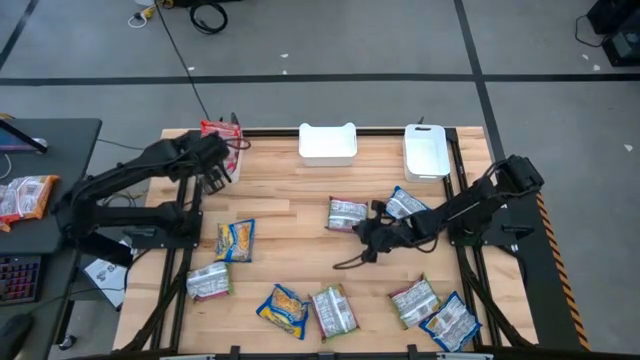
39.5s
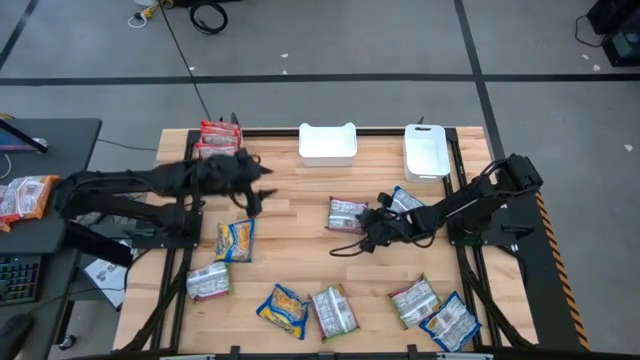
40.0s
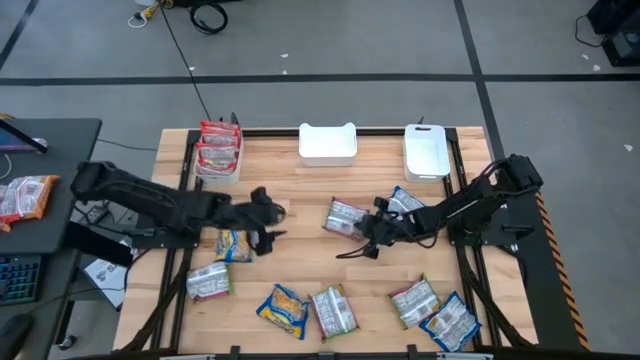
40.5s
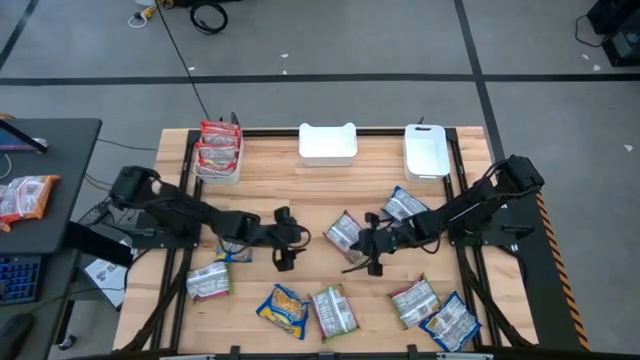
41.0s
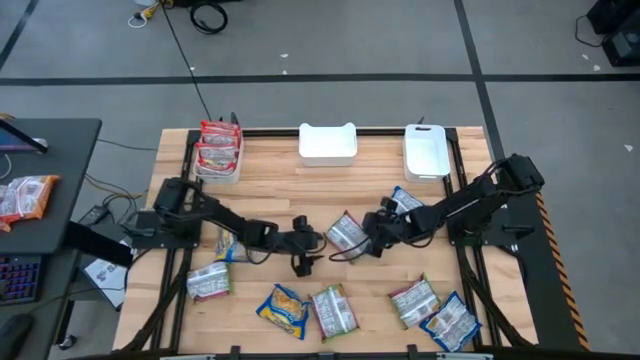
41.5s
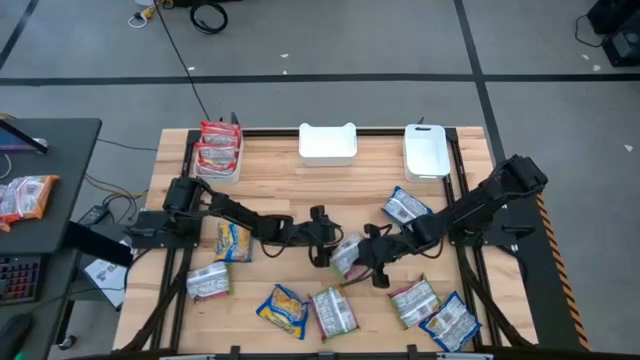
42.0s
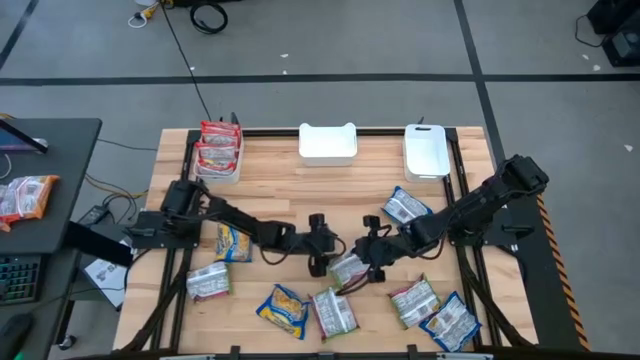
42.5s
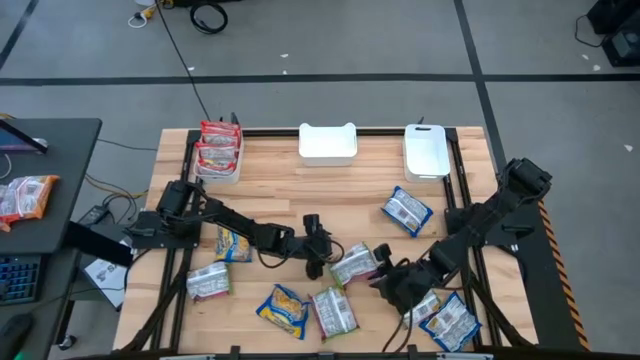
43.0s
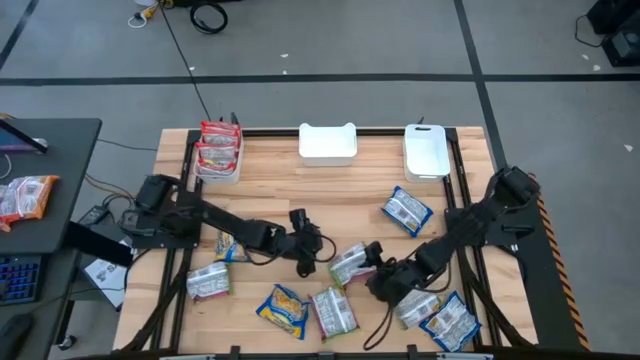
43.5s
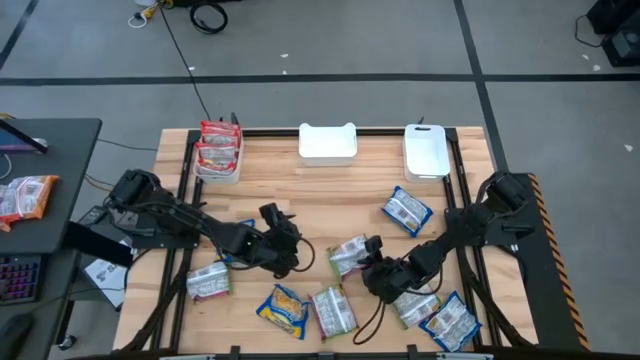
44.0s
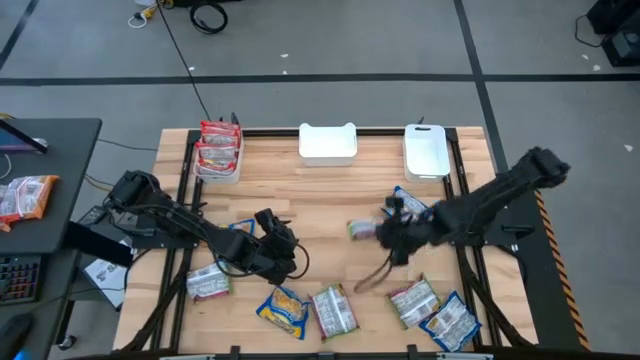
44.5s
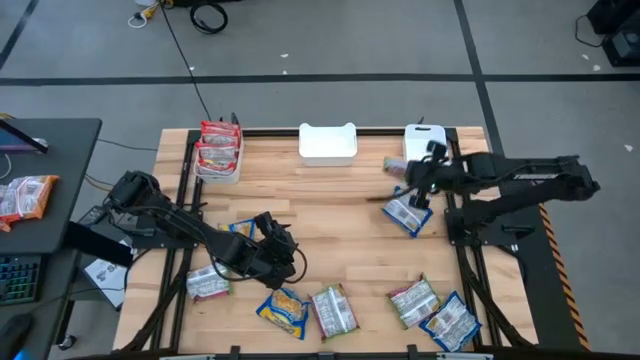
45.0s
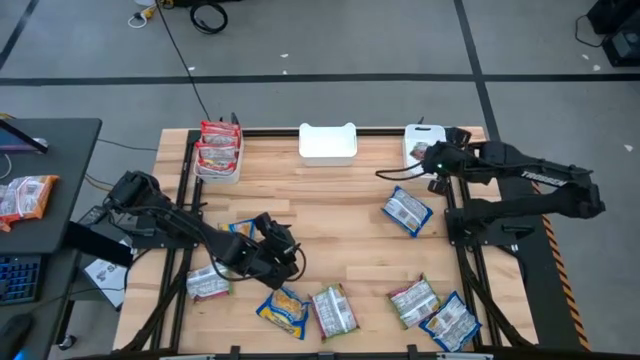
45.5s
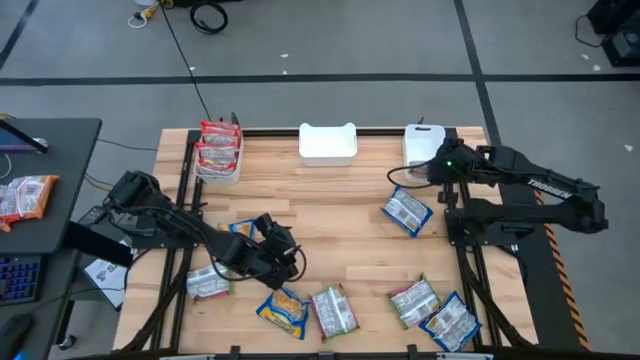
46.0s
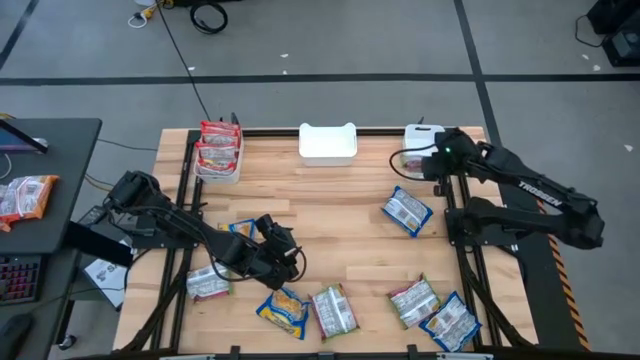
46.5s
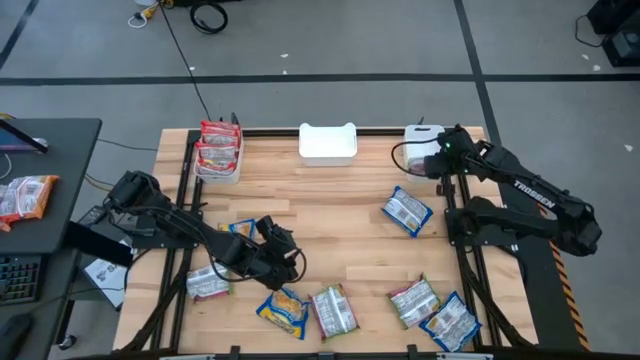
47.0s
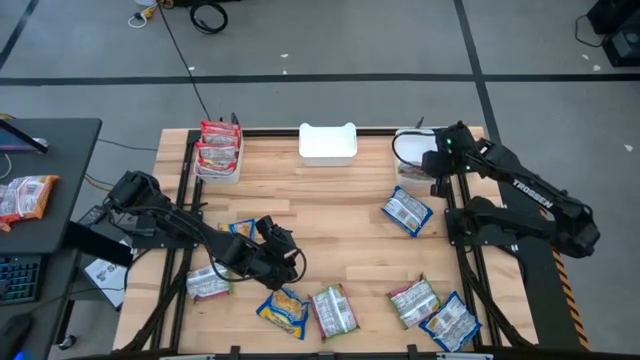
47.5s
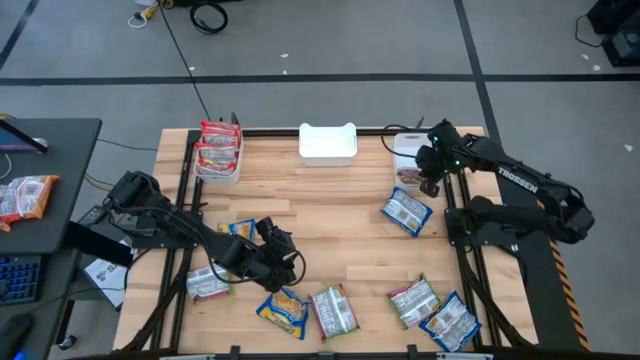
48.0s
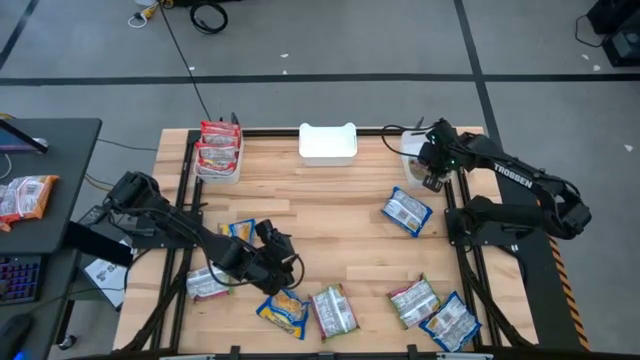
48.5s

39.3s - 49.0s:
Task: Sort Maruchan noodles
Put the green noodle pack into the right white bin

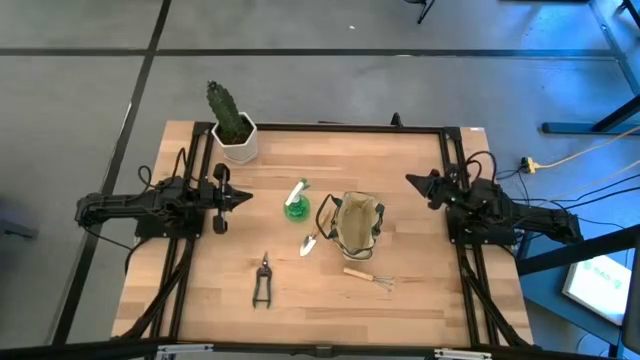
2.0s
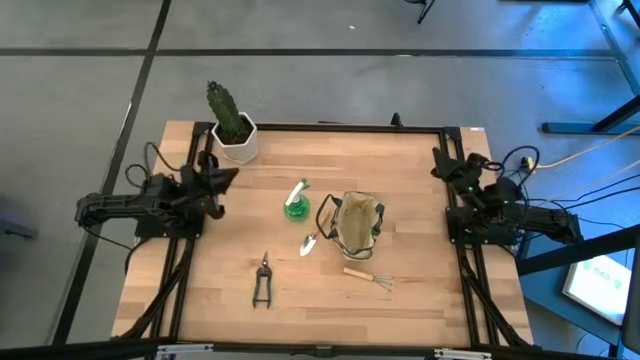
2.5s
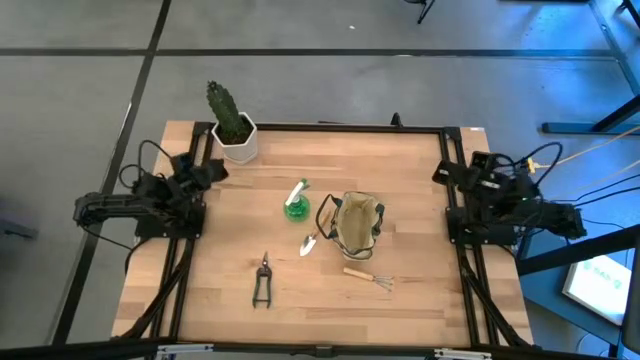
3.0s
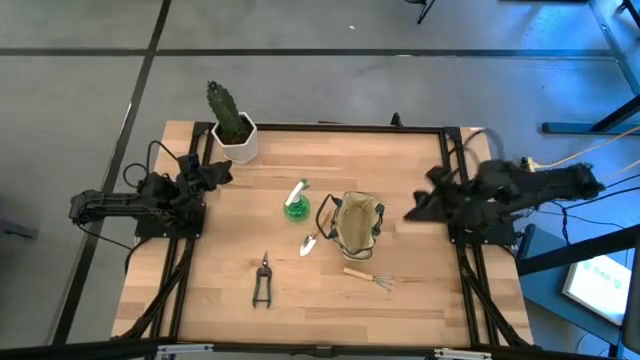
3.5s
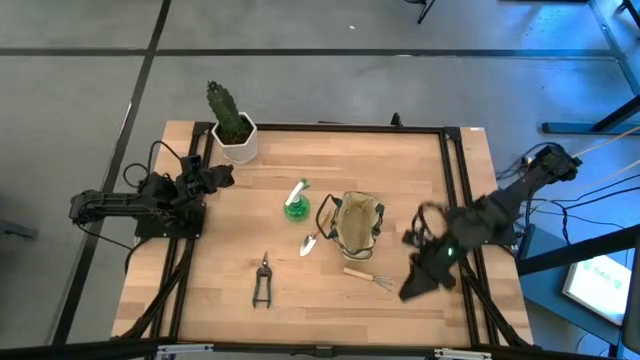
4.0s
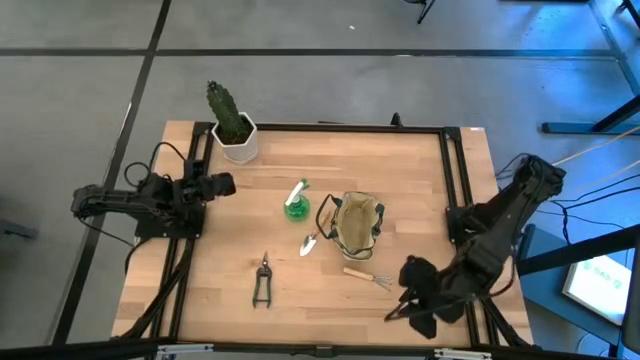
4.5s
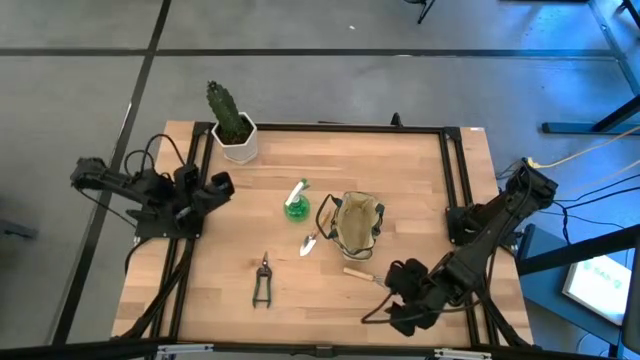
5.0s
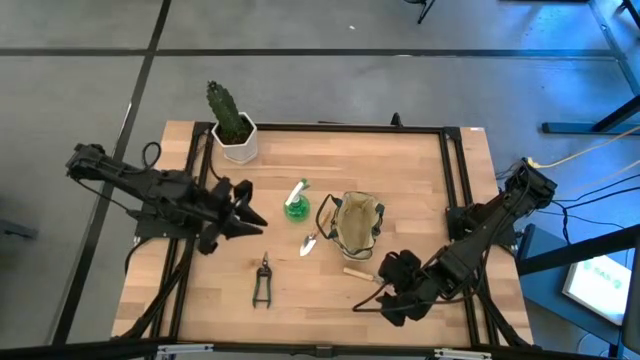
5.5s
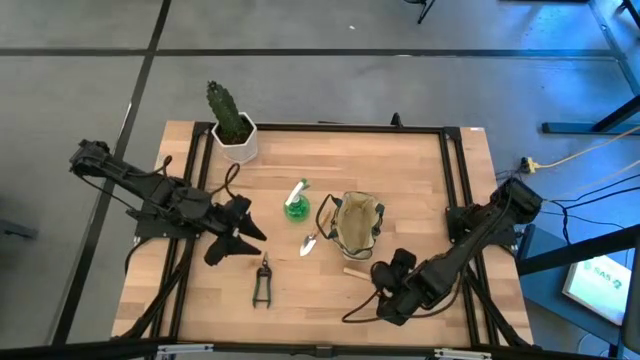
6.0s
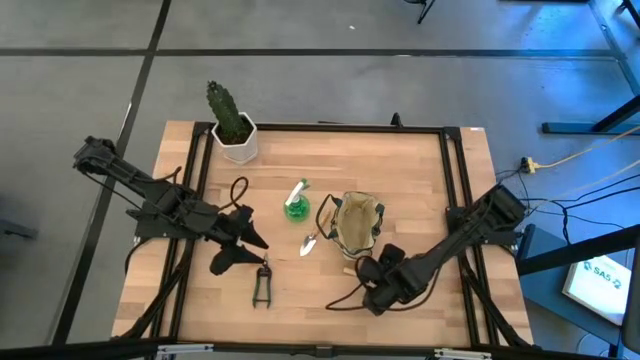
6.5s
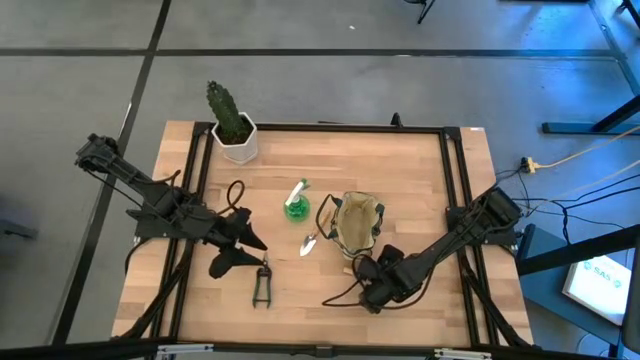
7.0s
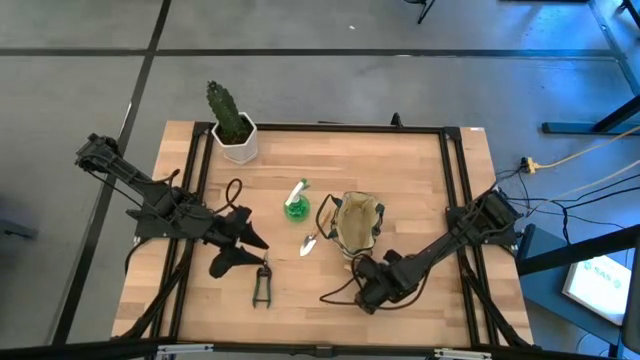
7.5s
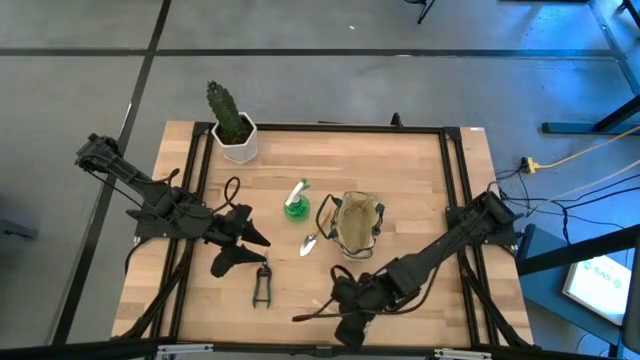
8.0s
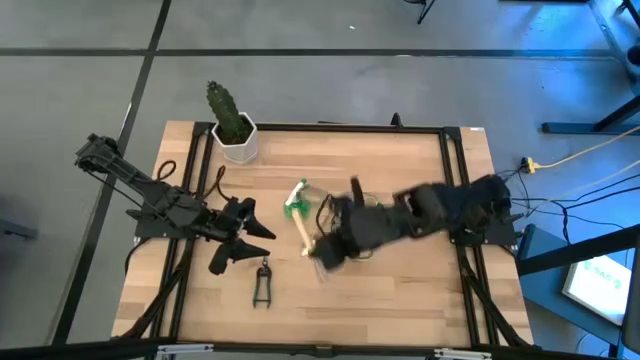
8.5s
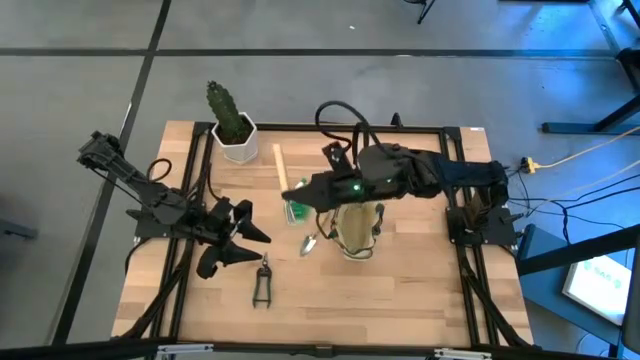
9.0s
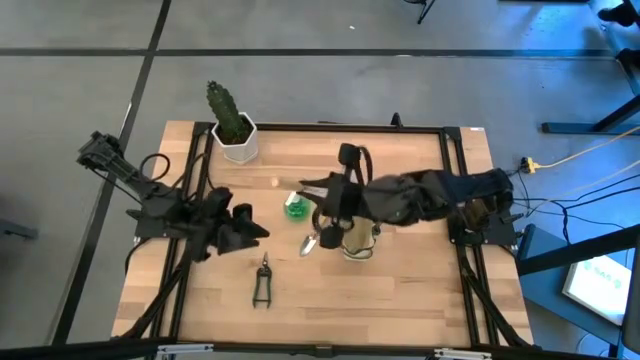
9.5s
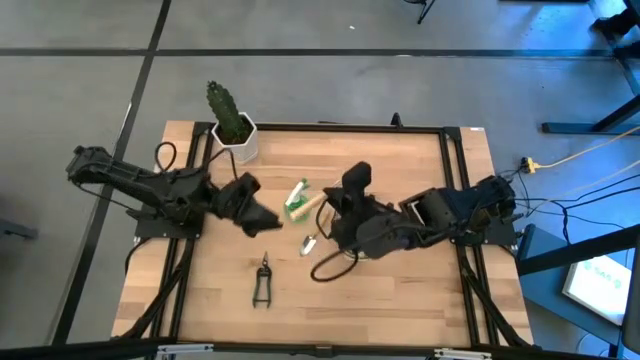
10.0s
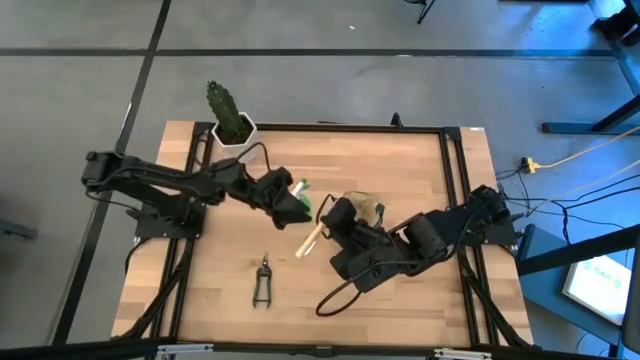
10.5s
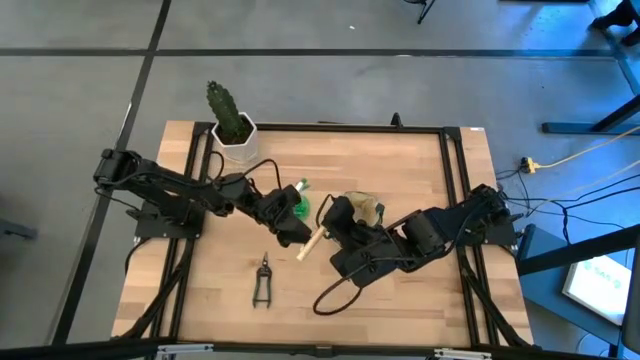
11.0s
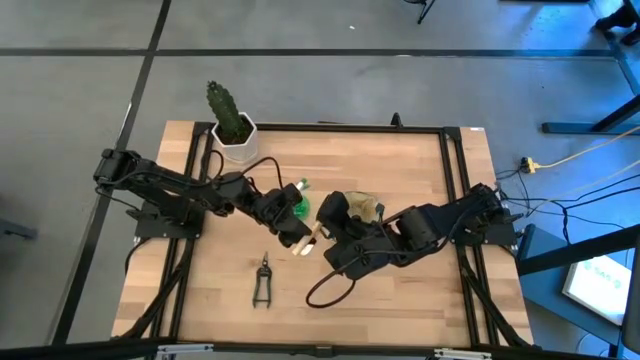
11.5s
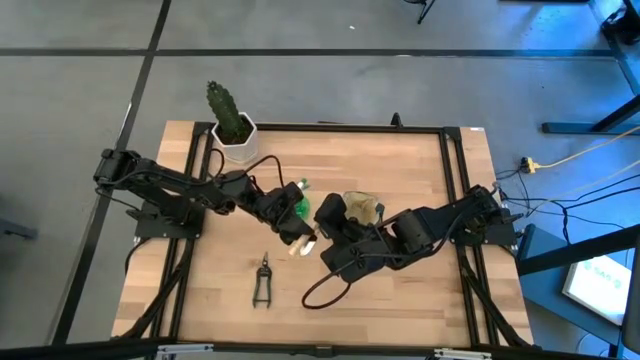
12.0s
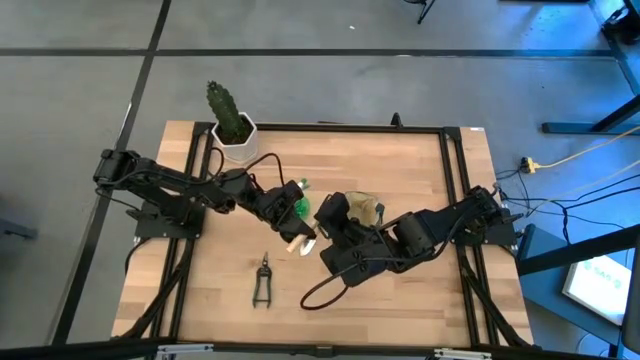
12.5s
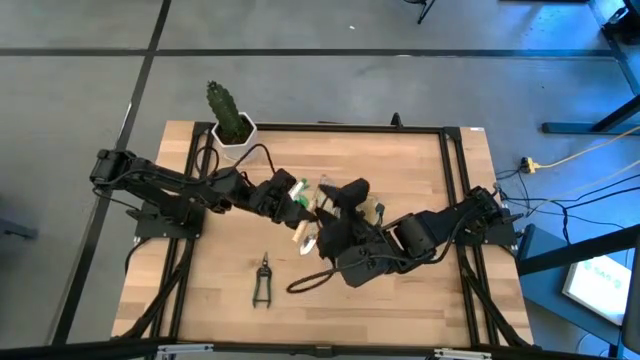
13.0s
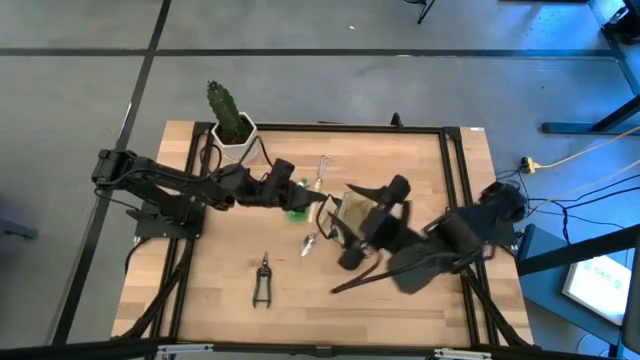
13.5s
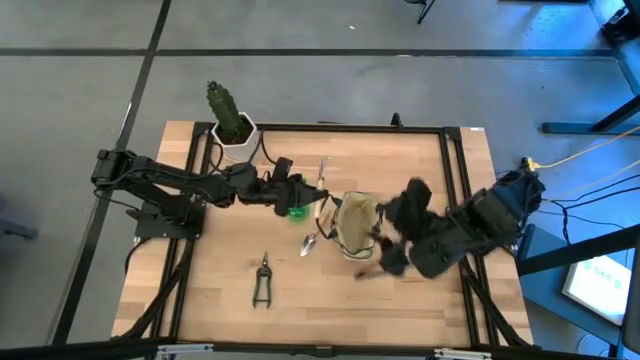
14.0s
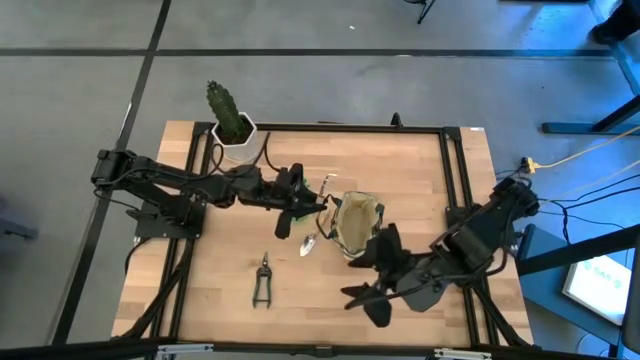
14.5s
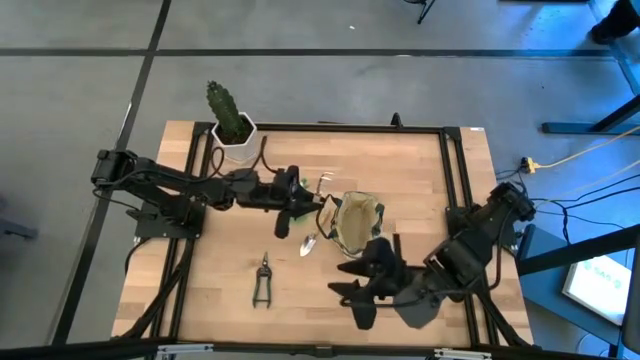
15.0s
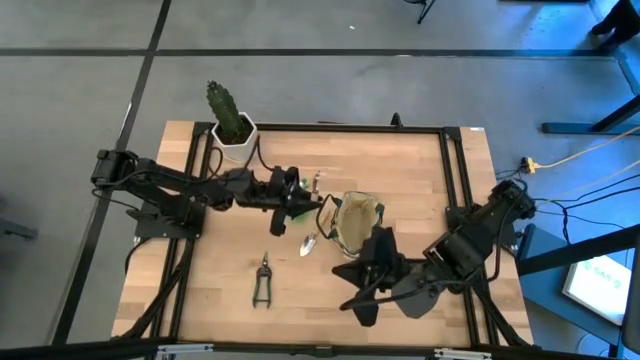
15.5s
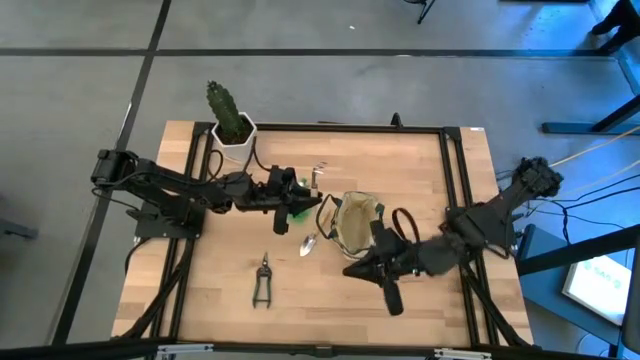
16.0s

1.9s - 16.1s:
Task: Pick & Place Garden tools in Gardening bag
Put the brown hand rake into the light brown gardening bag
